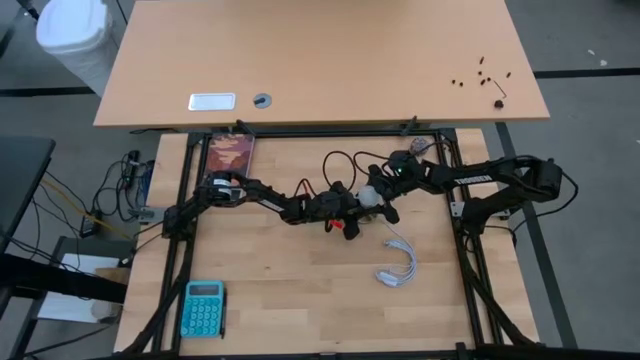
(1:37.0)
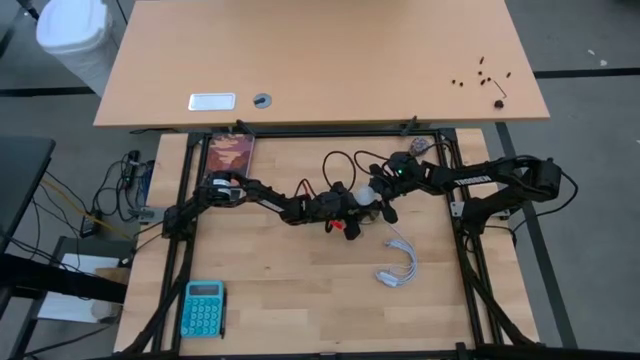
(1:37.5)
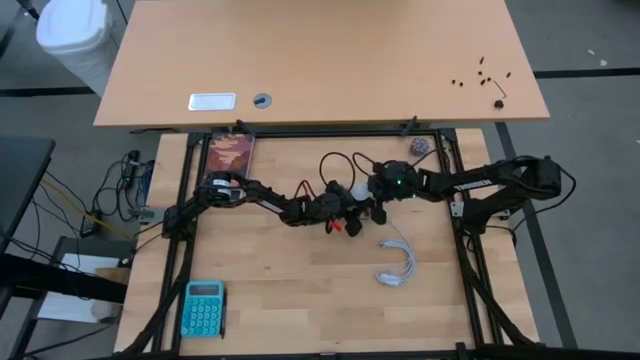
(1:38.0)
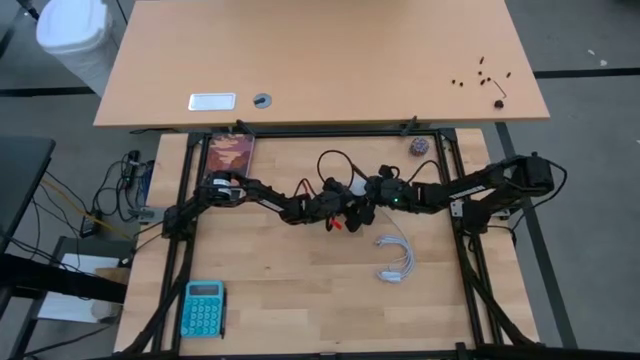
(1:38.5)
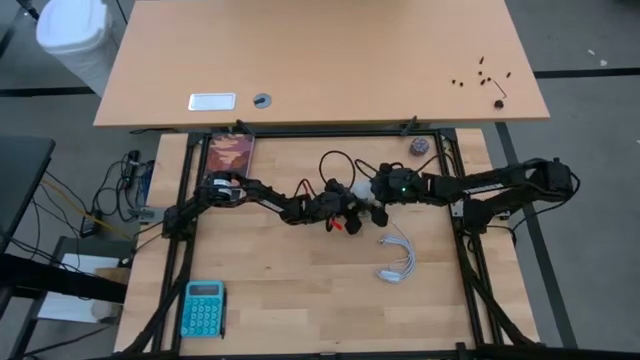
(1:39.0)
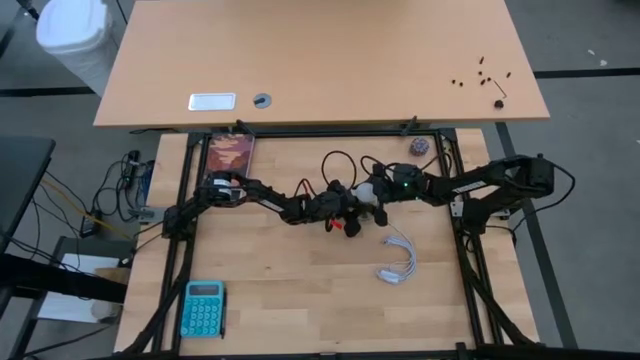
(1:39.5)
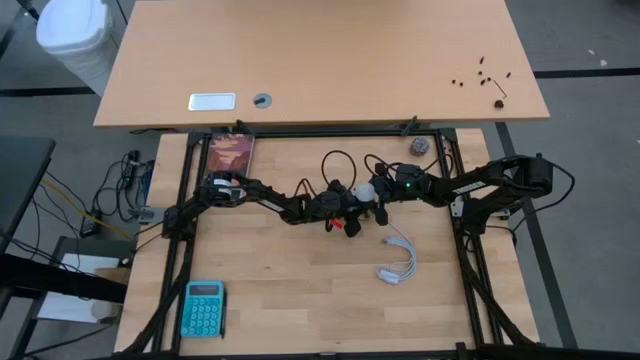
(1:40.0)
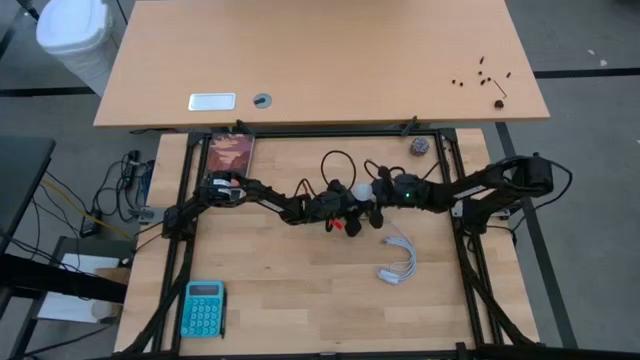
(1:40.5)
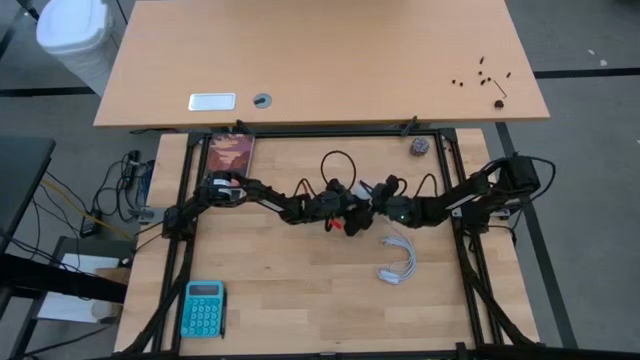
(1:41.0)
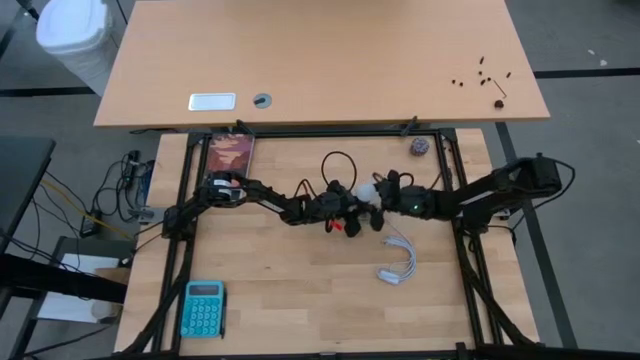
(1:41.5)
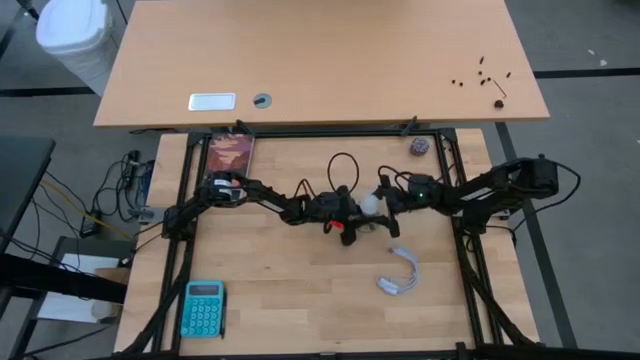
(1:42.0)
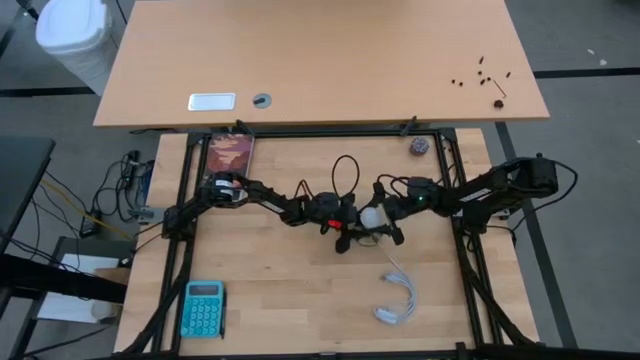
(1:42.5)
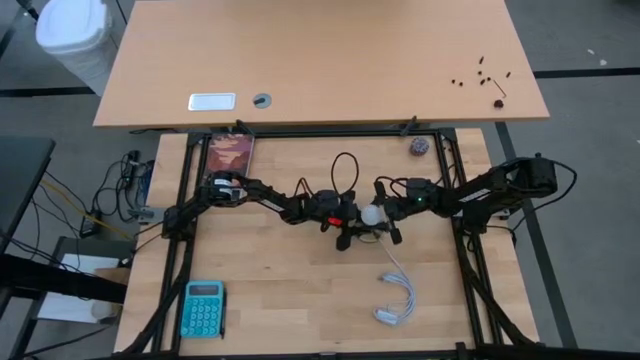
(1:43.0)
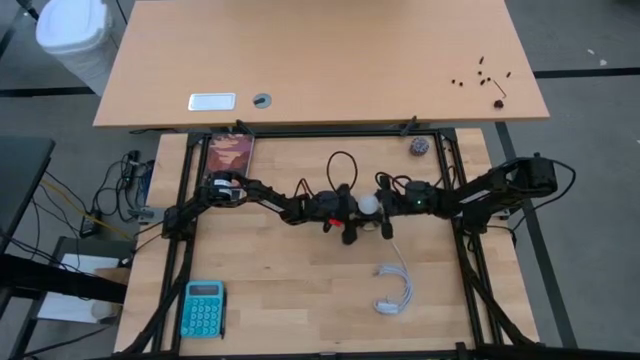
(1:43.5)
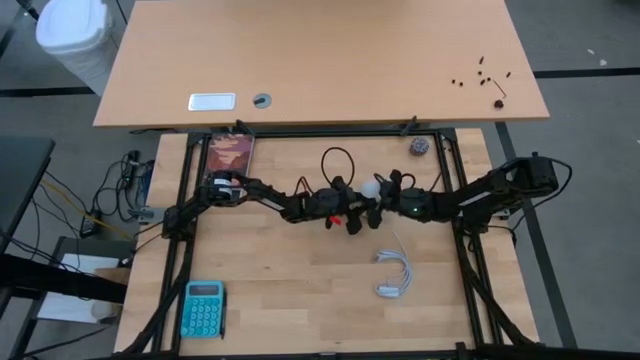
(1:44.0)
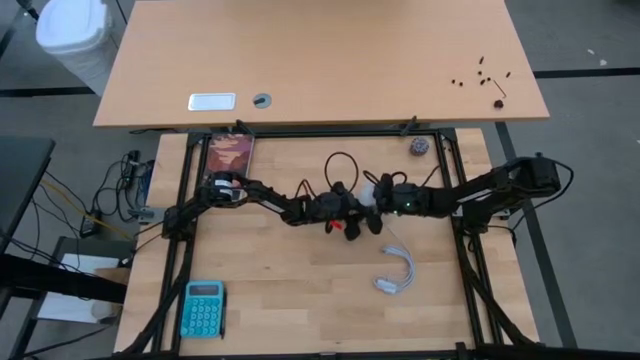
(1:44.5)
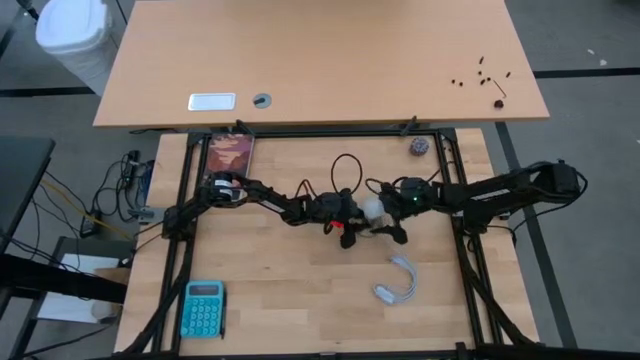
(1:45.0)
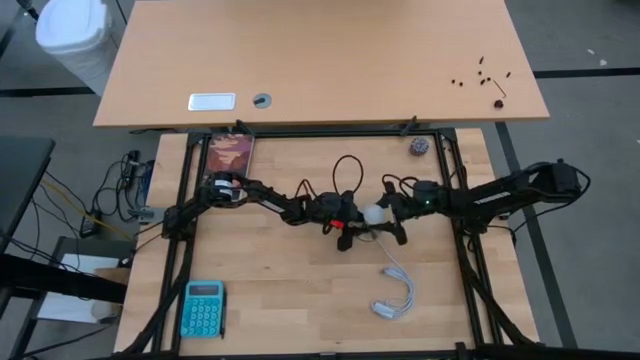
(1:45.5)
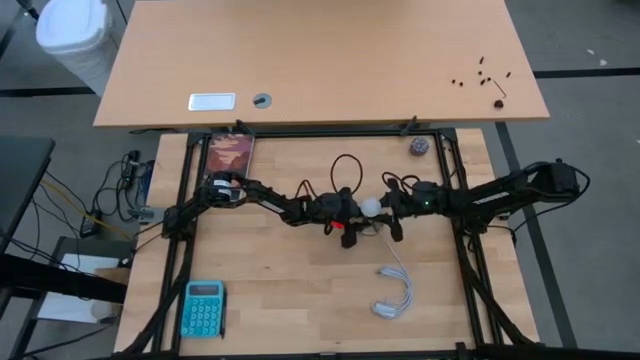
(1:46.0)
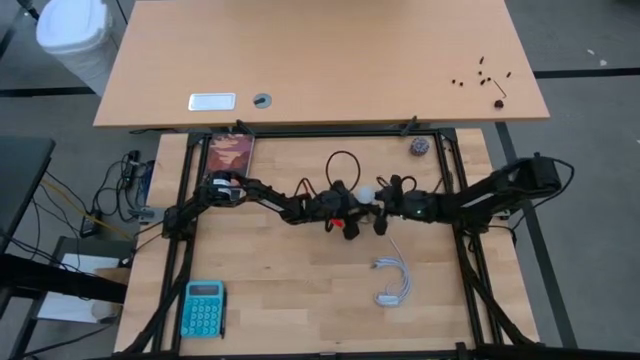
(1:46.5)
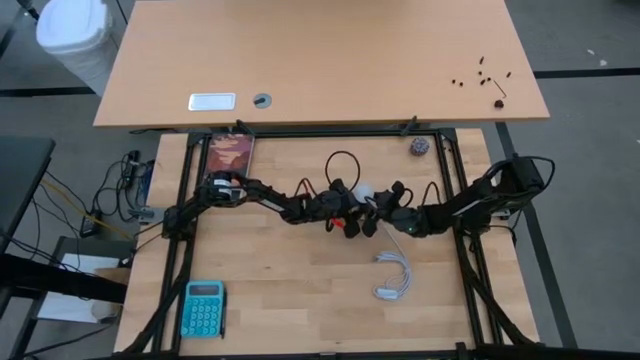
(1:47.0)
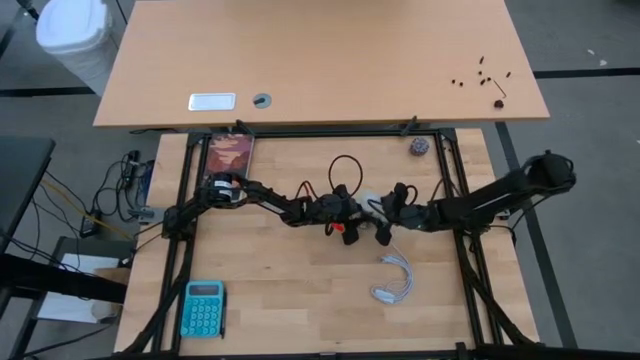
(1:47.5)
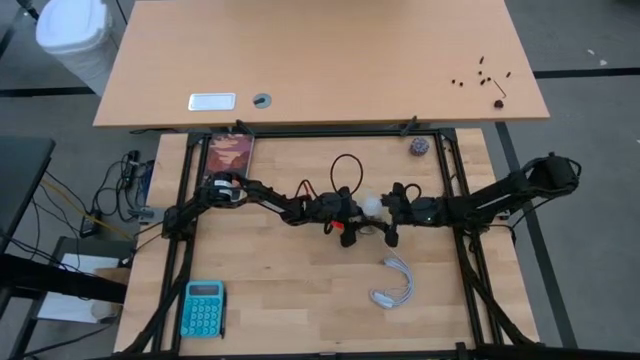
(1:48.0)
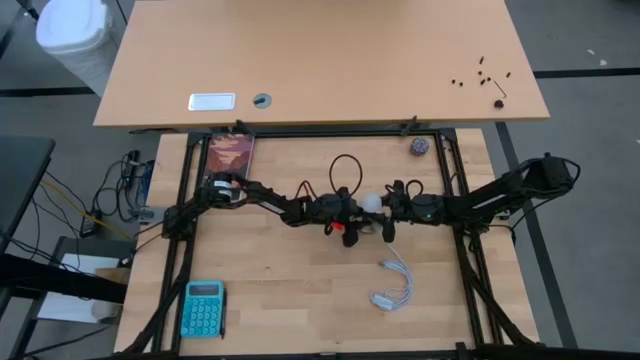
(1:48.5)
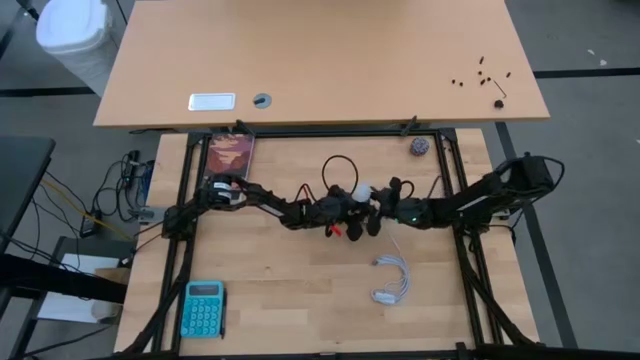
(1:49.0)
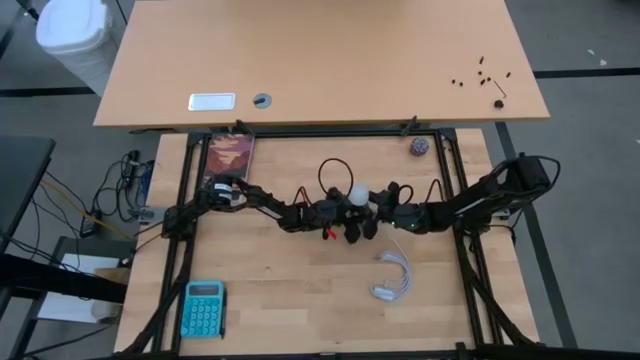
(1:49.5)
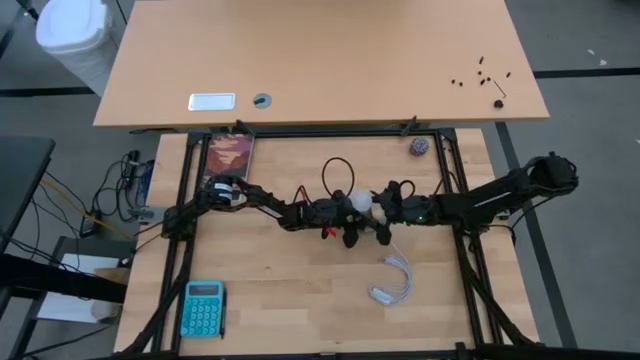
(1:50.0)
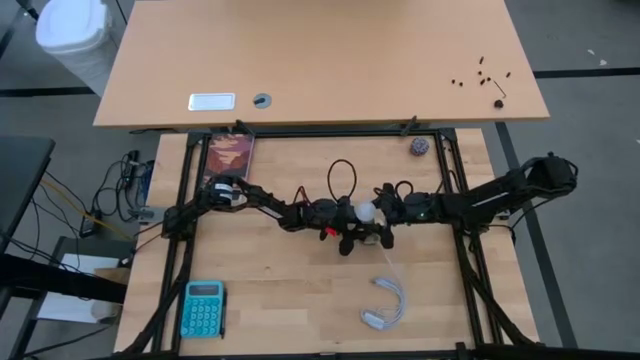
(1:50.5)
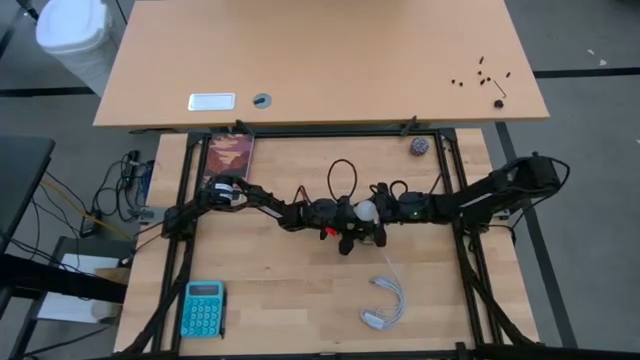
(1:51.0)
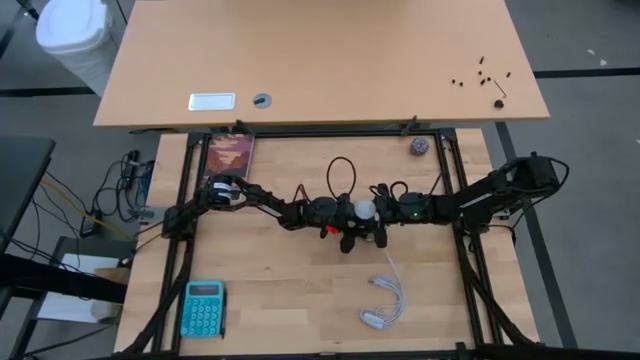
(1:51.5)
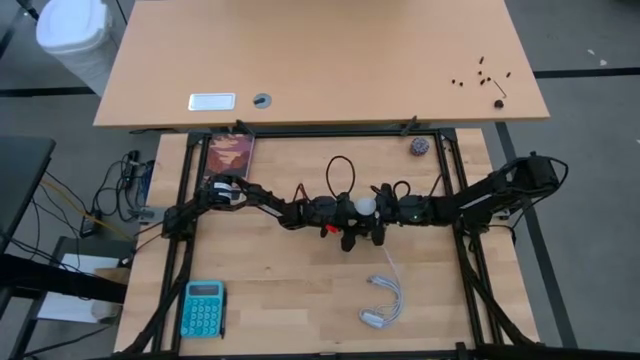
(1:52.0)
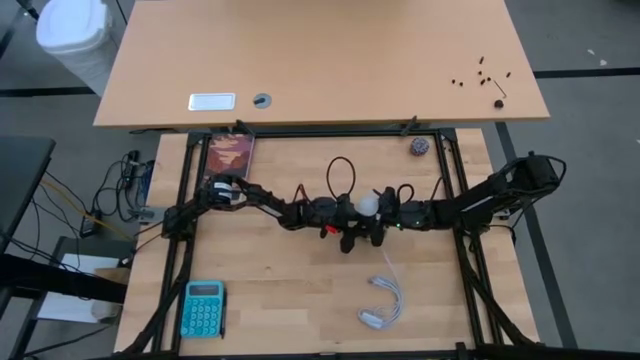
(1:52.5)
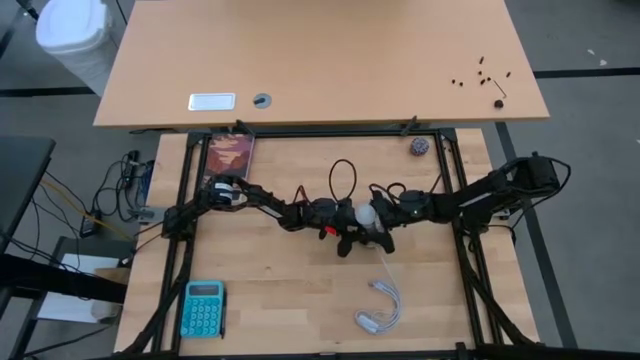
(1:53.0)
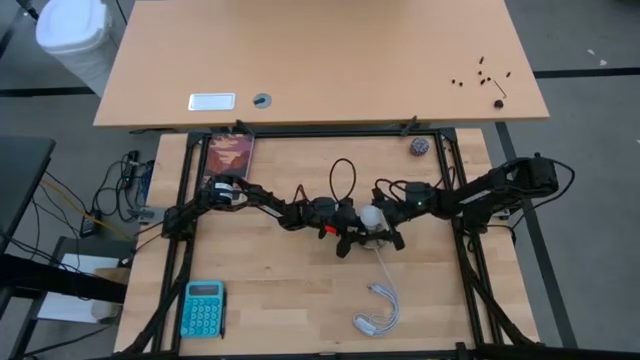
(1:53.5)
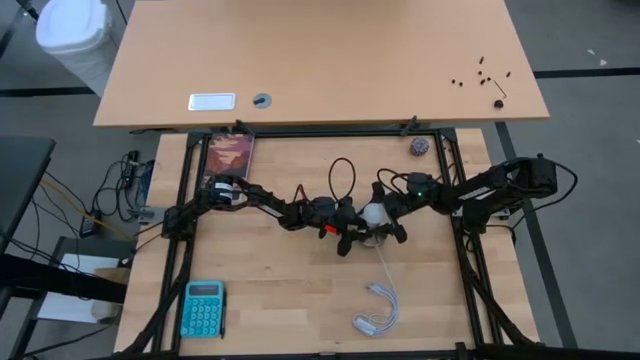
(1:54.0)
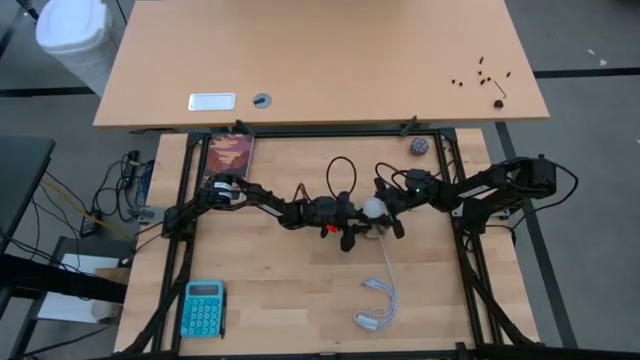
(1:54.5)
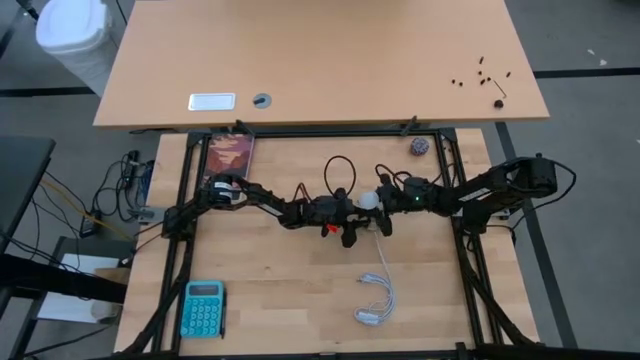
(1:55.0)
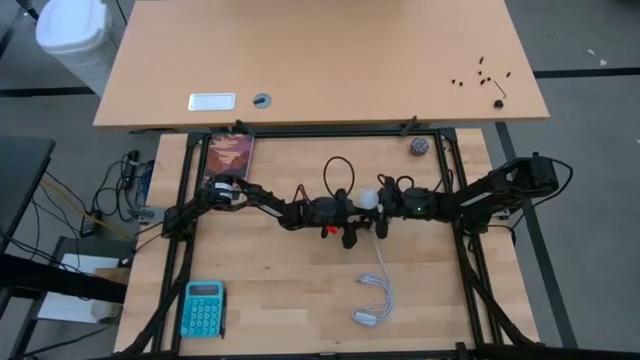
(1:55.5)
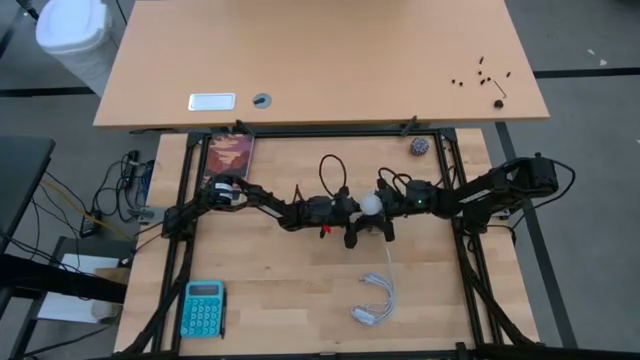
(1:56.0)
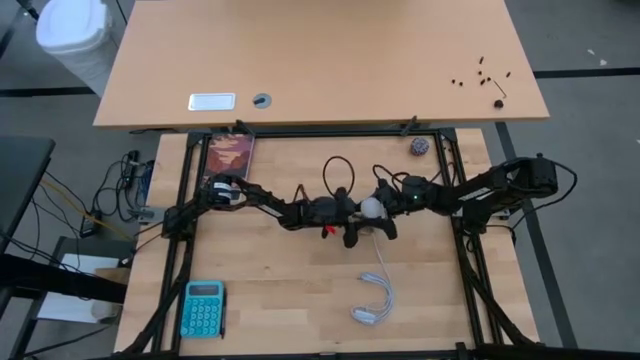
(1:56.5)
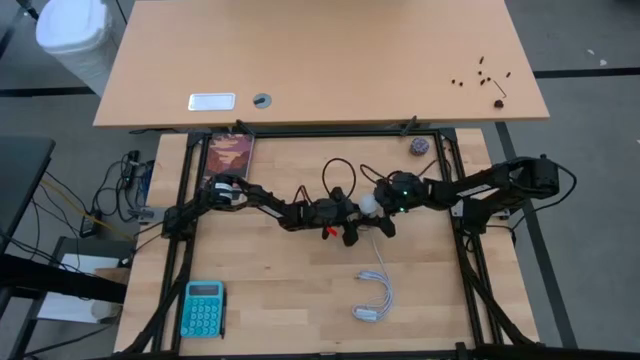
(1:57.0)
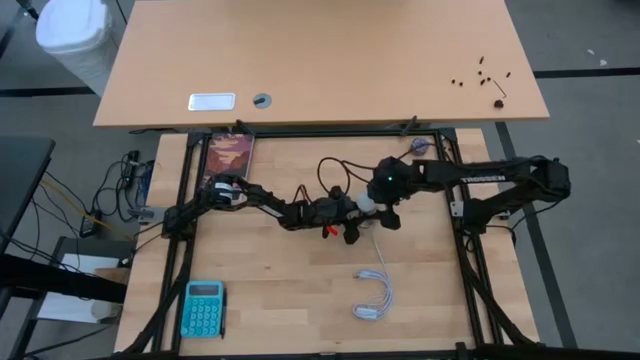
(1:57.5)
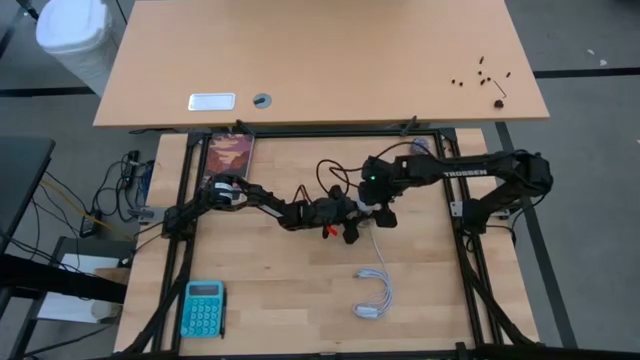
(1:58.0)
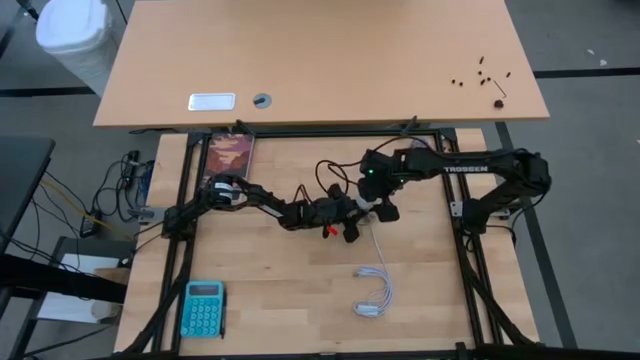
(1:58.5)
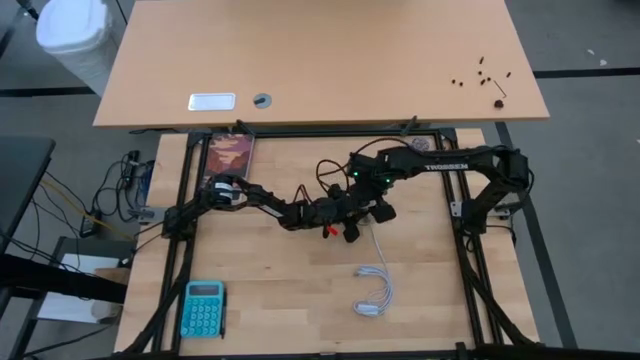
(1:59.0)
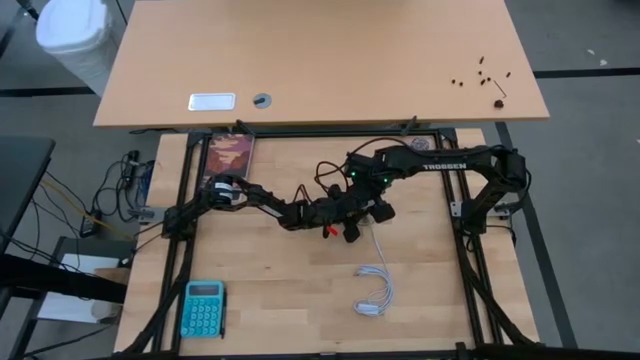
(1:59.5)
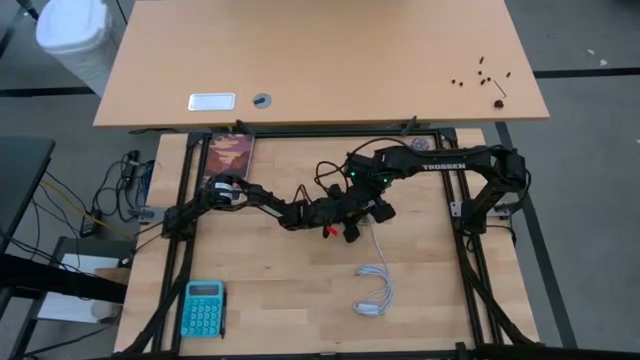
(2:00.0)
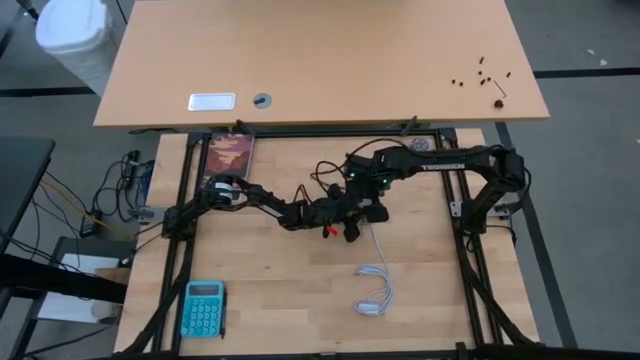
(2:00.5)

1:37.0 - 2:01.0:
Task: Screw lightbulb
Insert the white lightbulb into the lamp
